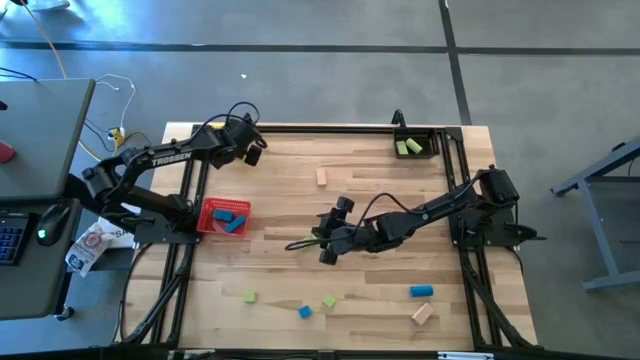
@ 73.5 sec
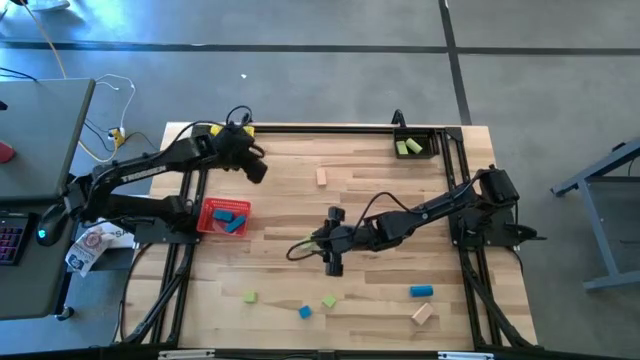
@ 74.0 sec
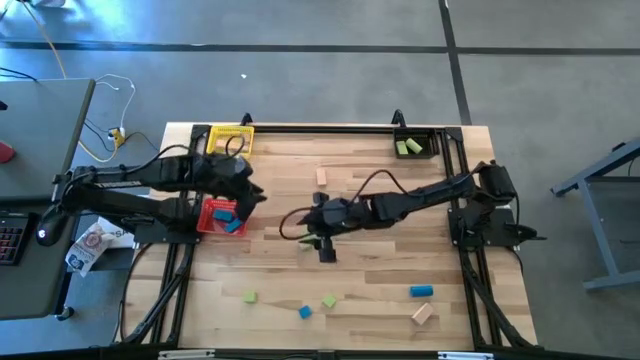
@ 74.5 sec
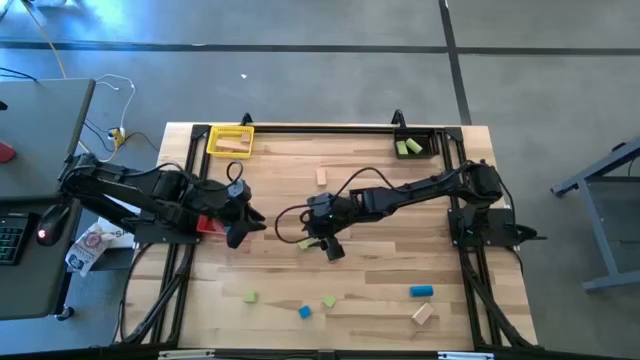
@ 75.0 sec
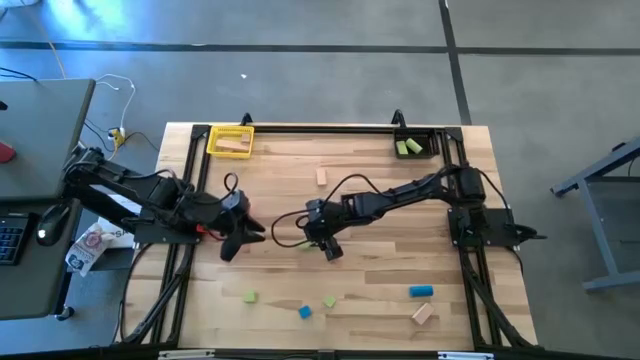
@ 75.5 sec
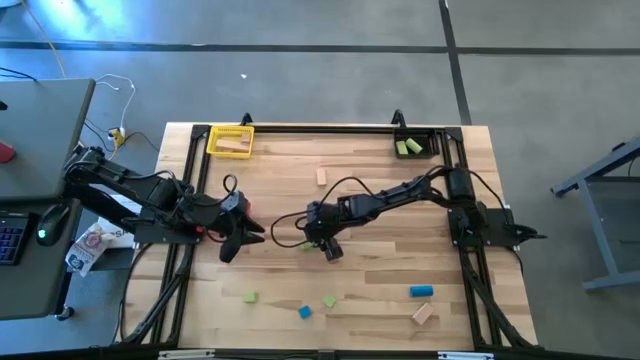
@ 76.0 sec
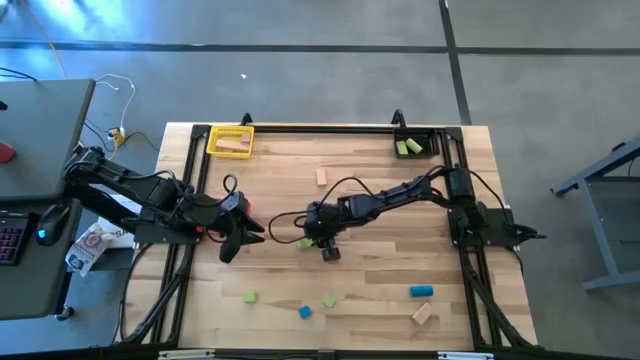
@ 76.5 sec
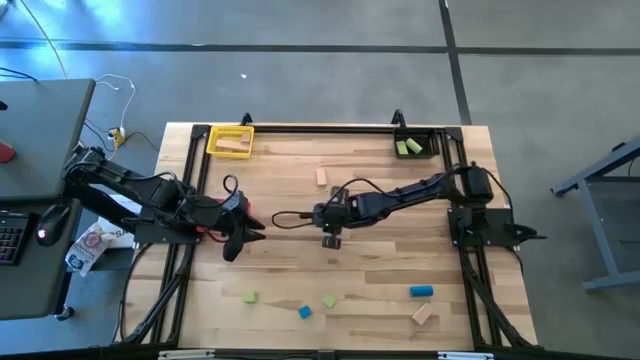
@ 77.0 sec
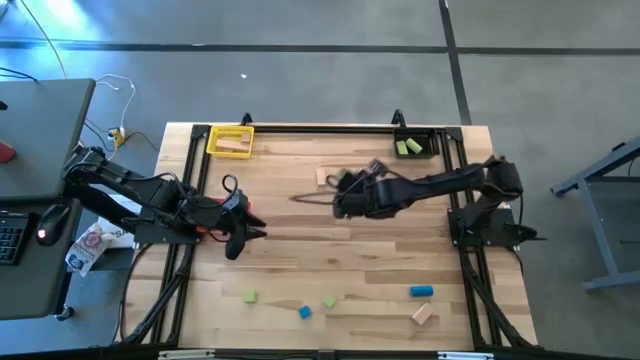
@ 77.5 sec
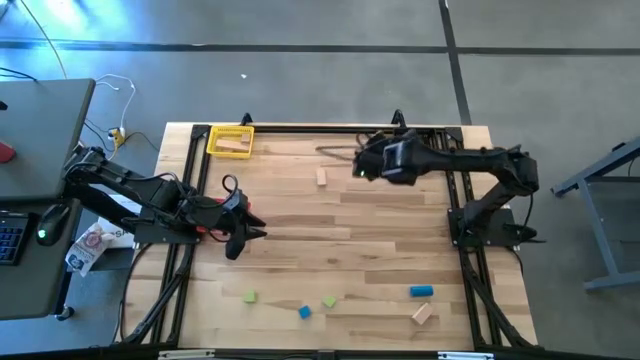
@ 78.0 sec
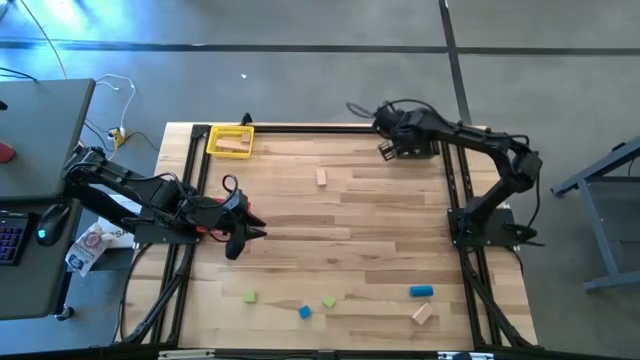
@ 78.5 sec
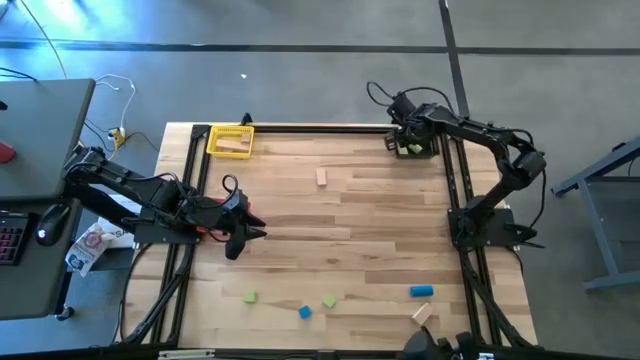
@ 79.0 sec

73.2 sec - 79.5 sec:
Task: Sort & place blocks by color
Put the green block into the black bin

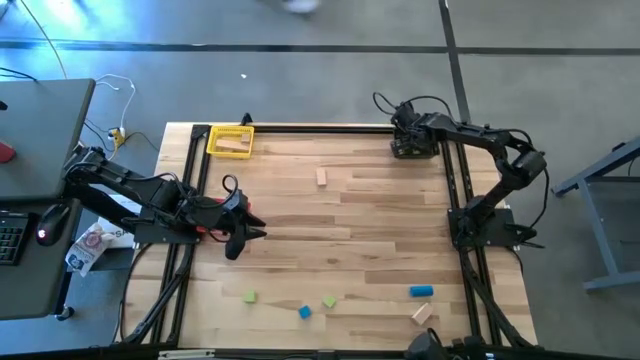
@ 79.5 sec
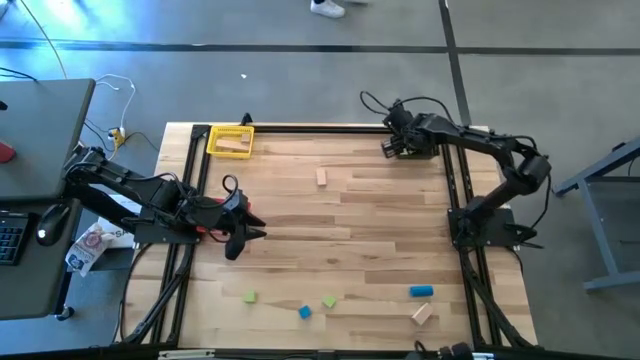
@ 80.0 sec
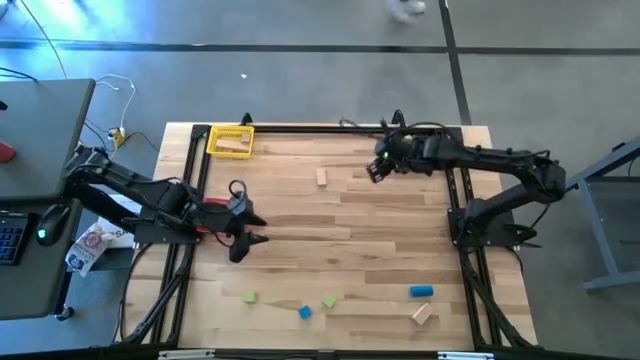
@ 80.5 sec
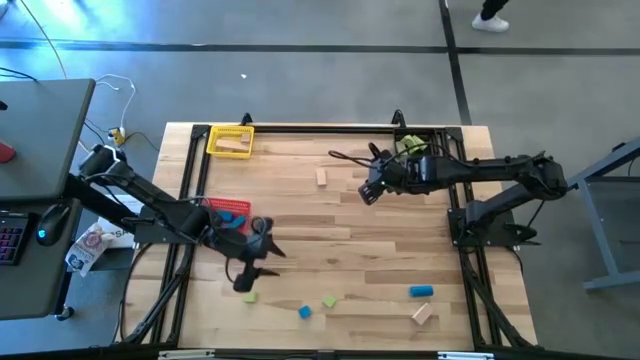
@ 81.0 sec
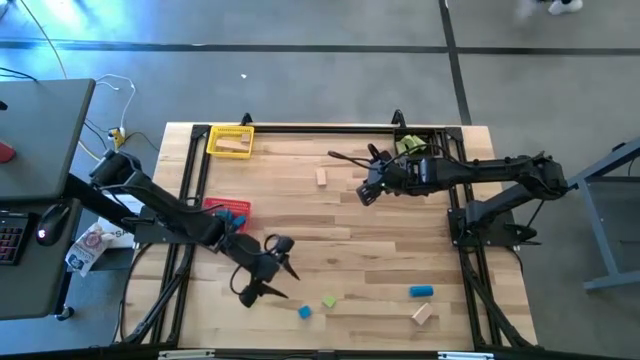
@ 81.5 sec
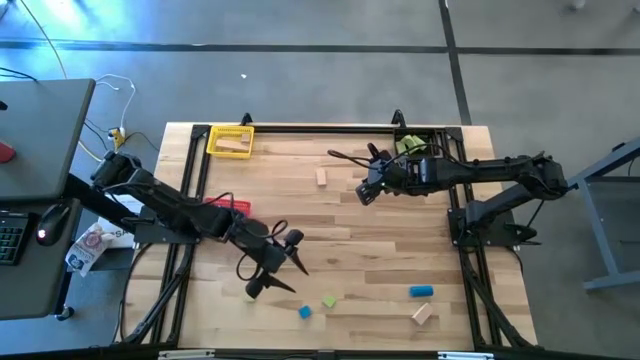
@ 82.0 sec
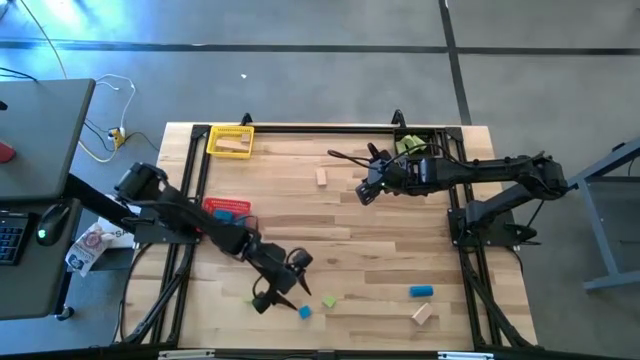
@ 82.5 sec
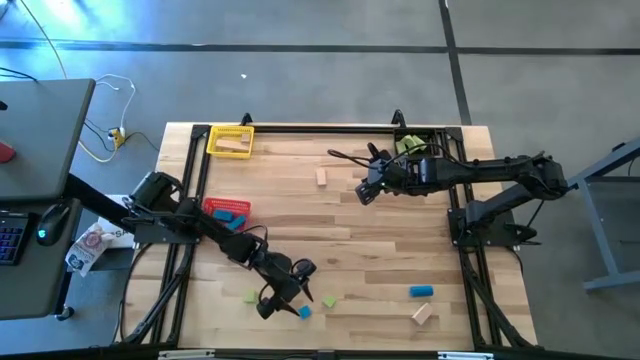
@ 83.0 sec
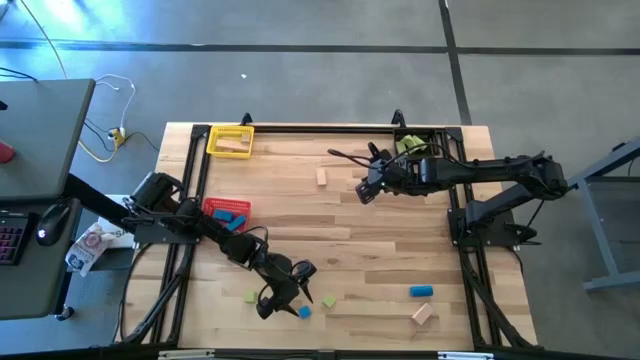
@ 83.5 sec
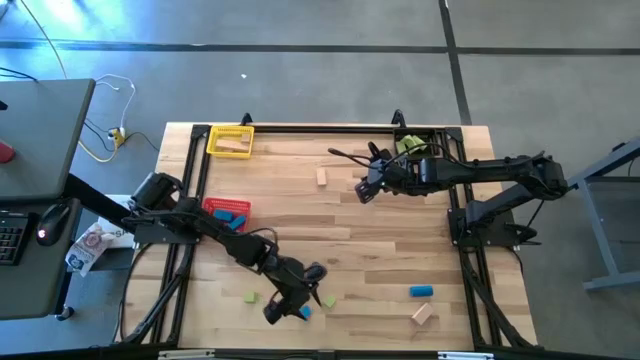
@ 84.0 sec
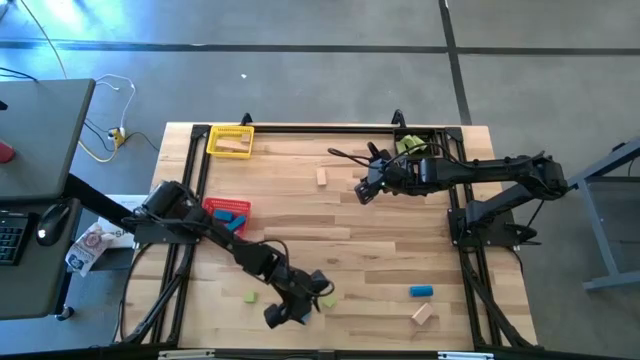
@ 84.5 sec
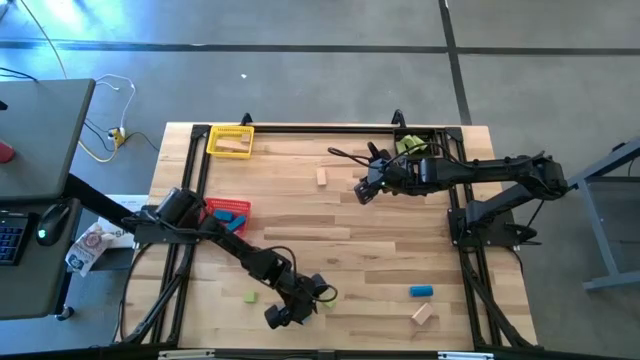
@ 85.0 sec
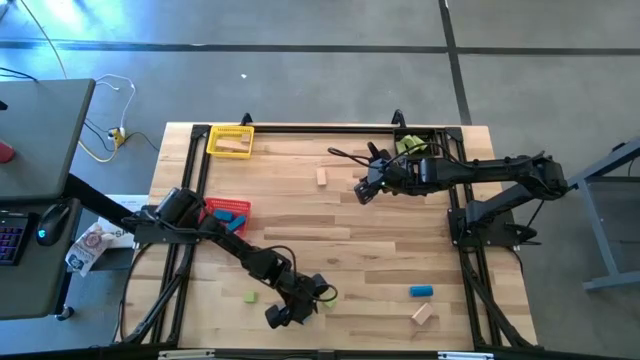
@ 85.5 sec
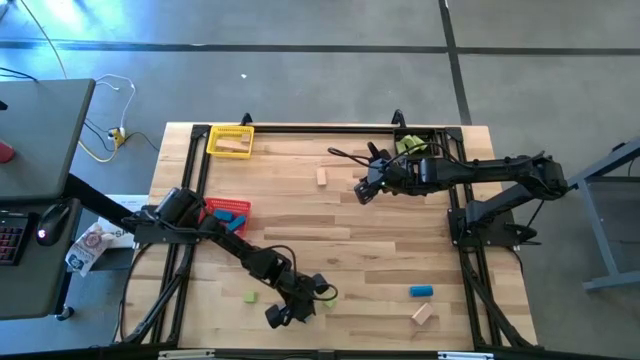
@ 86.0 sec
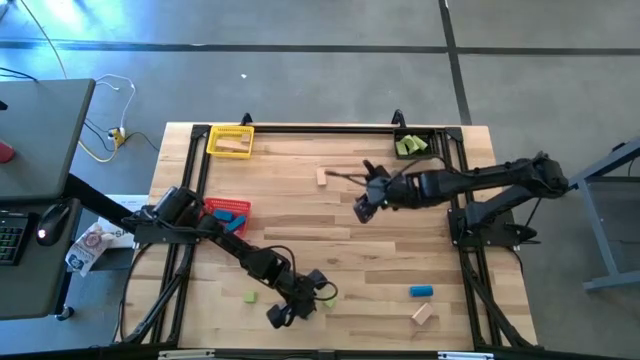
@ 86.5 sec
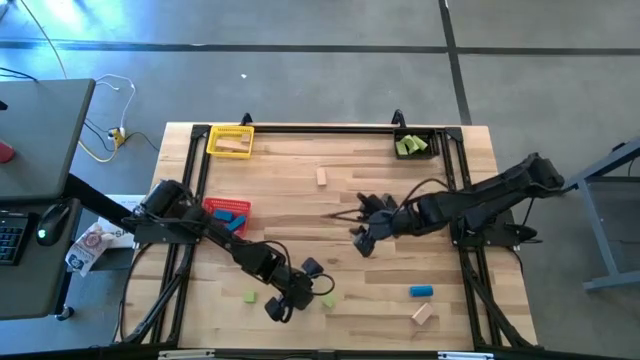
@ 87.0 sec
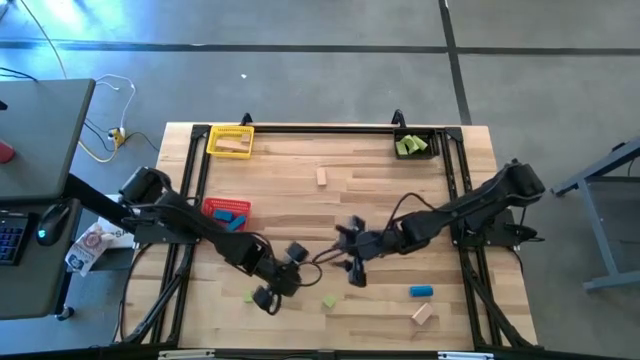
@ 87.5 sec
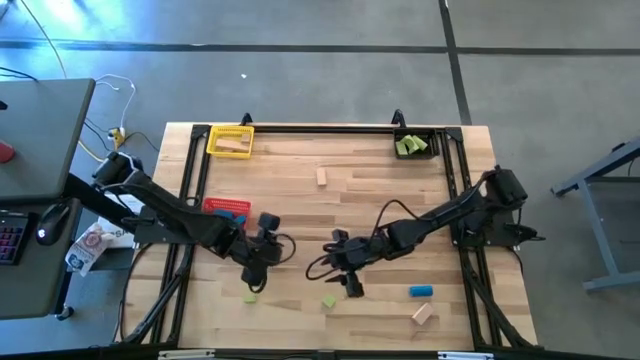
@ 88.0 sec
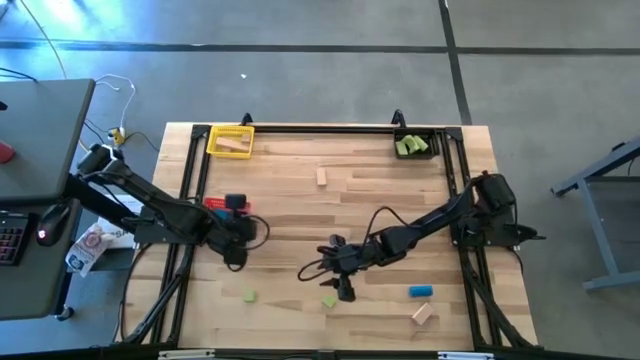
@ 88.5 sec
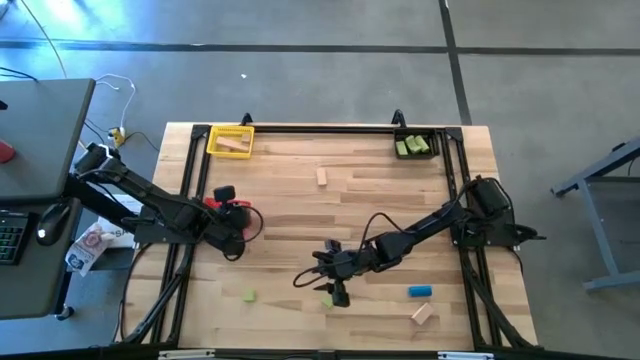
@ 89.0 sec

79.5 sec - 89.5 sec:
Put the blue block into the red bin

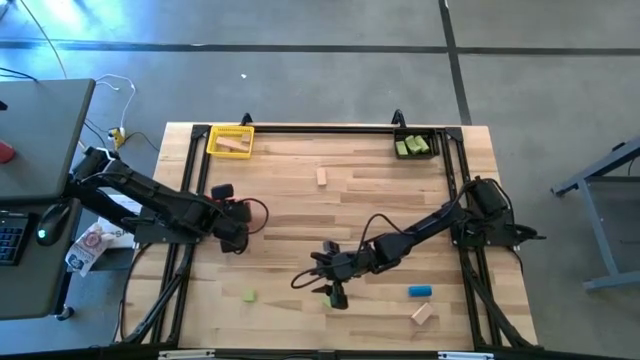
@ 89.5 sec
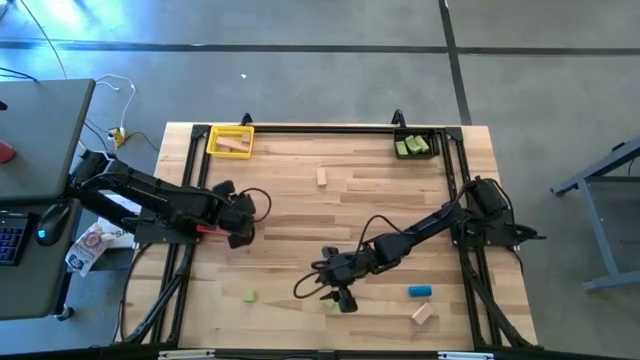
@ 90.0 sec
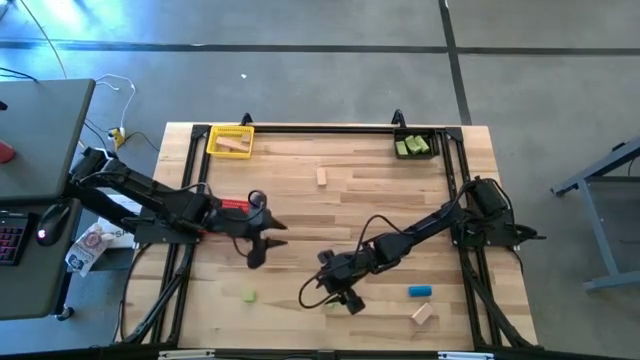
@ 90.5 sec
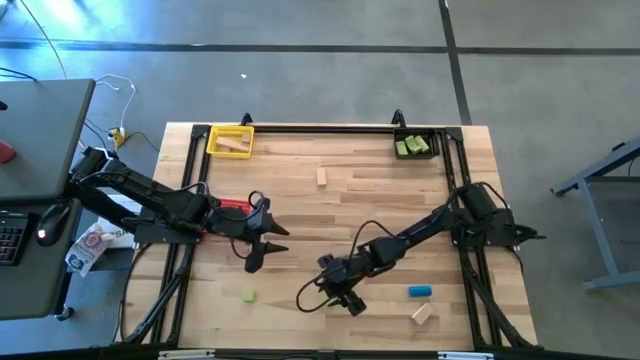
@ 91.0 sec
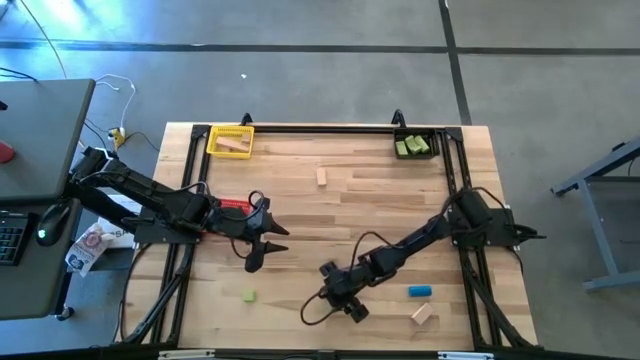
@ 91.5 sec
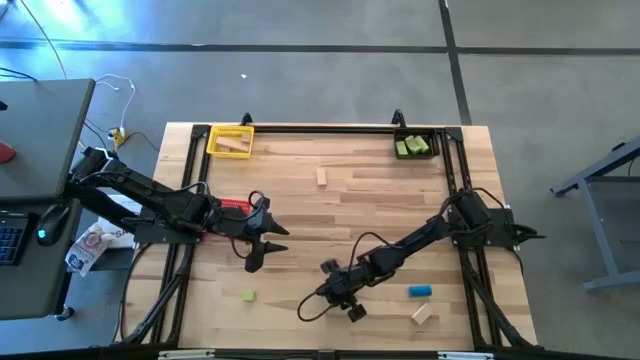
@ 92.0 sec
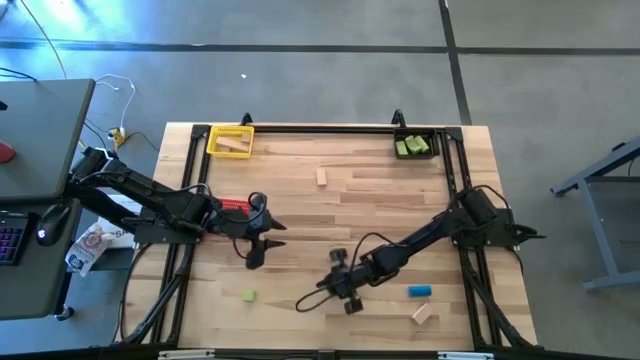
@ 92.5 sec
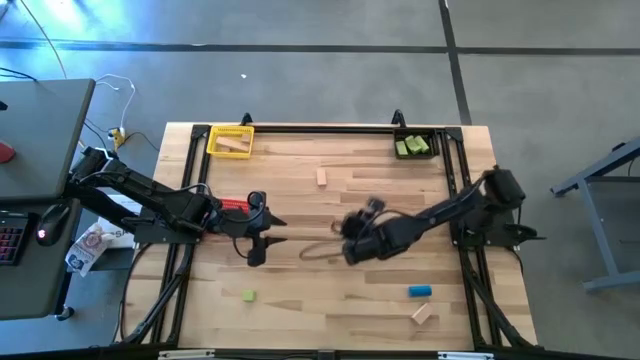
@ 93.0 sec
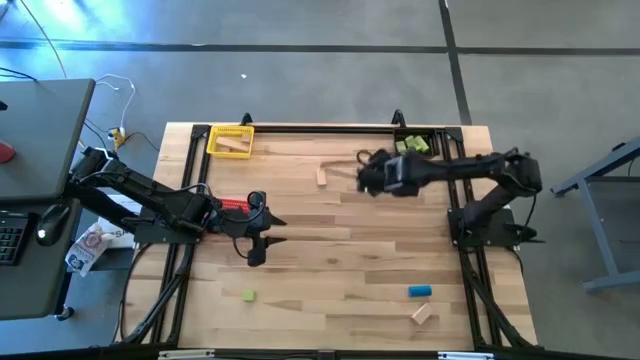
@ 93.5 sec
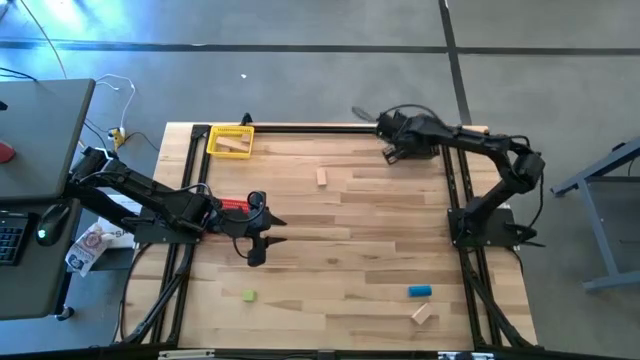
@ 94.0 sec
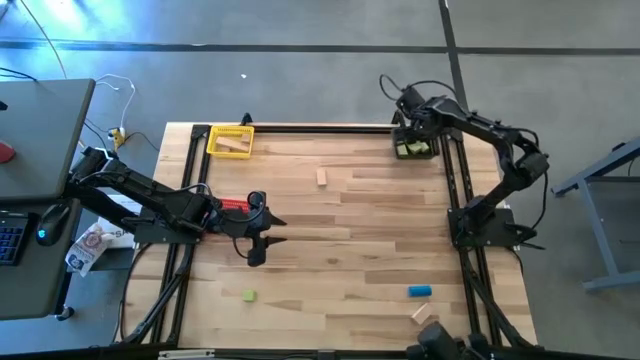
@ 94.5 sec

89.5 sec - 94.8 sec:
Put the green block into the black bin
